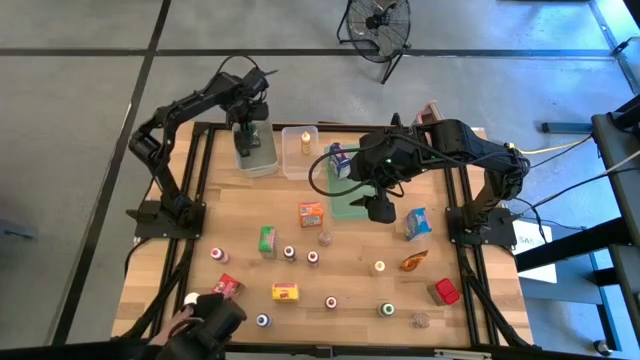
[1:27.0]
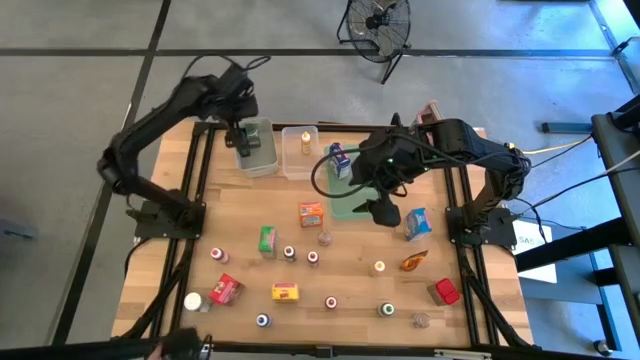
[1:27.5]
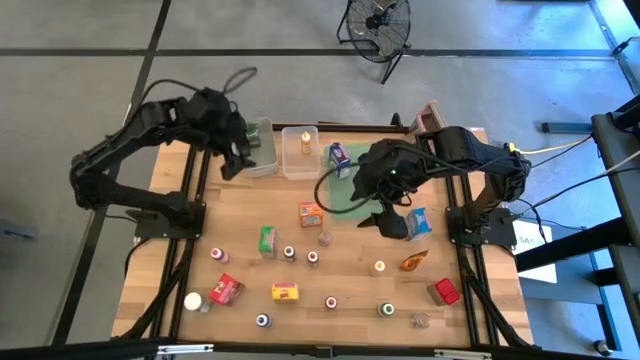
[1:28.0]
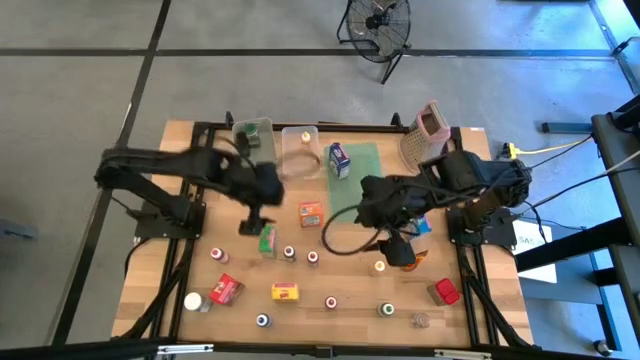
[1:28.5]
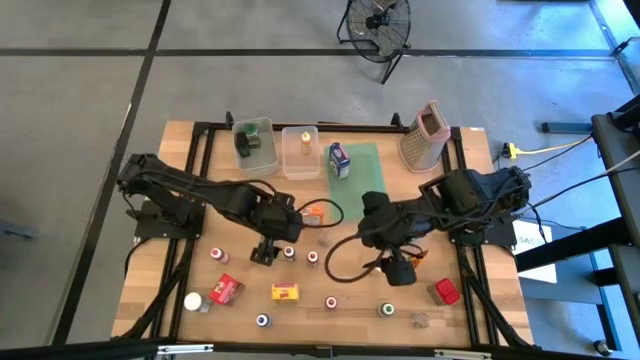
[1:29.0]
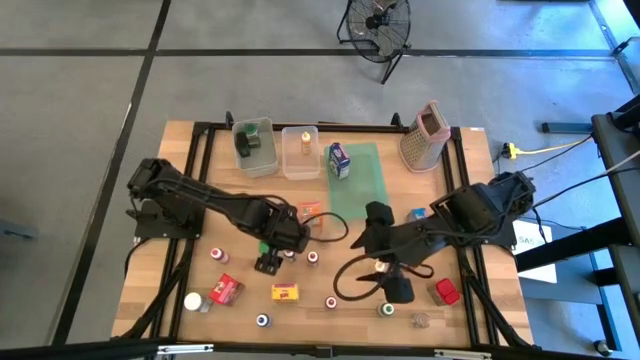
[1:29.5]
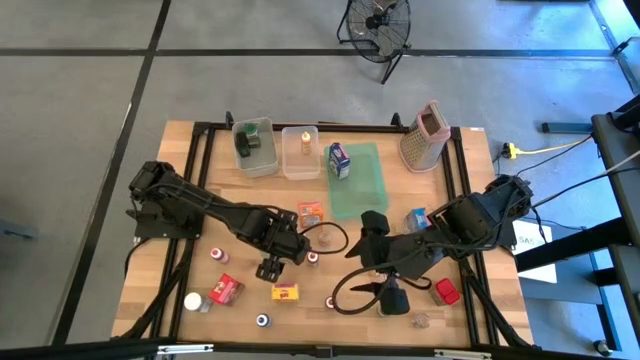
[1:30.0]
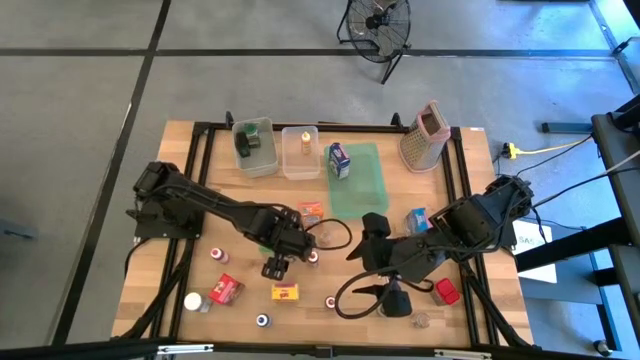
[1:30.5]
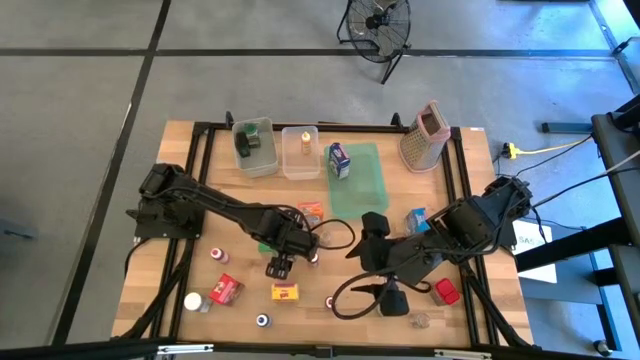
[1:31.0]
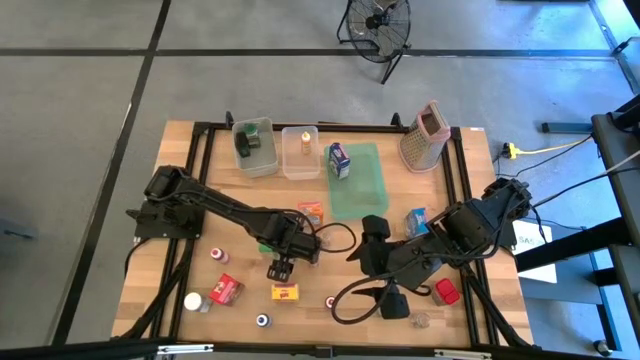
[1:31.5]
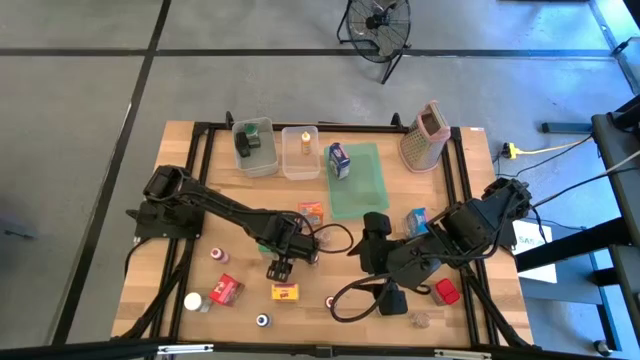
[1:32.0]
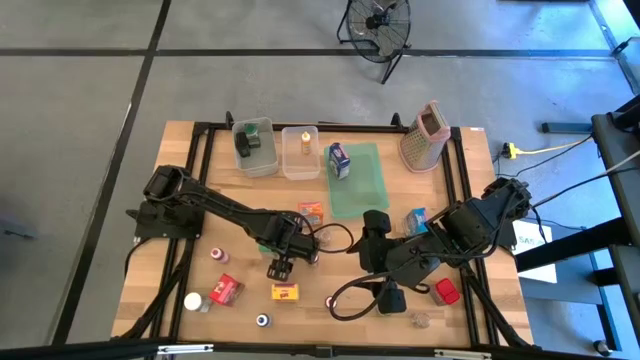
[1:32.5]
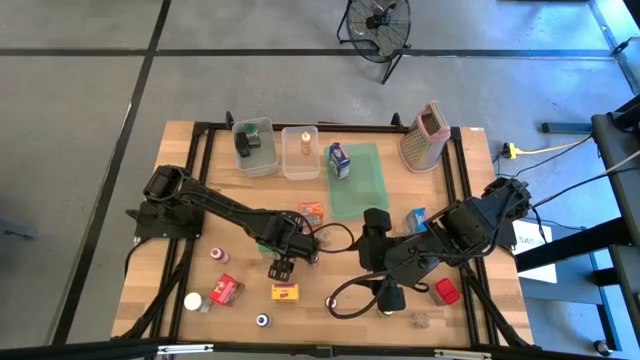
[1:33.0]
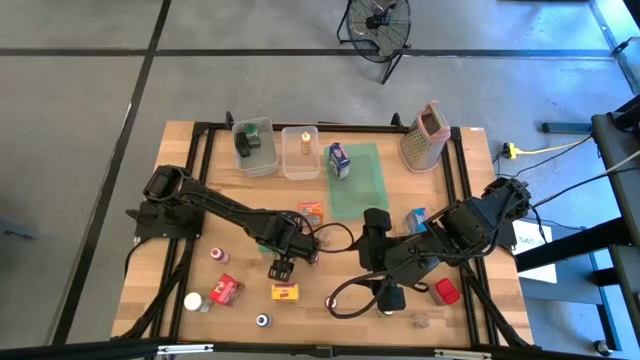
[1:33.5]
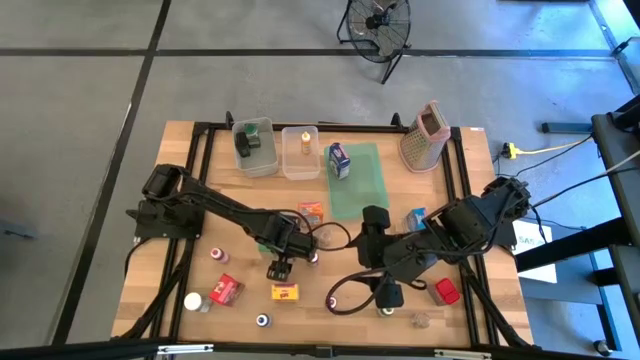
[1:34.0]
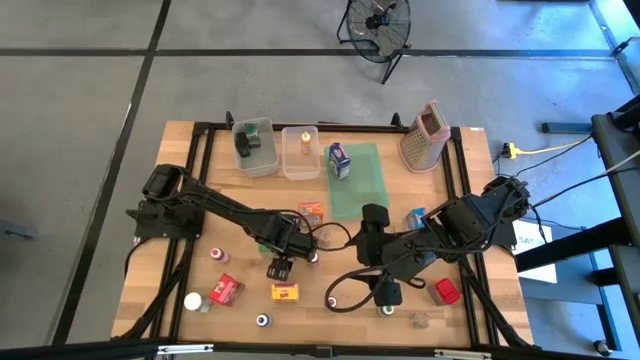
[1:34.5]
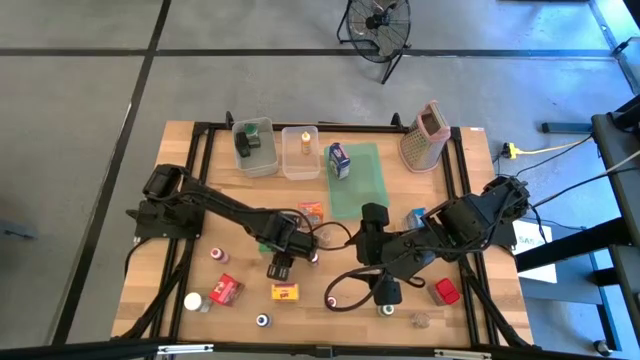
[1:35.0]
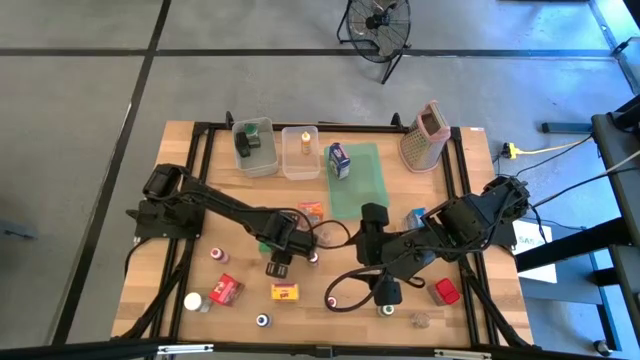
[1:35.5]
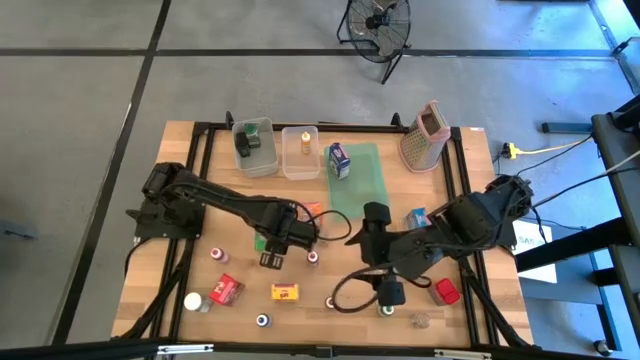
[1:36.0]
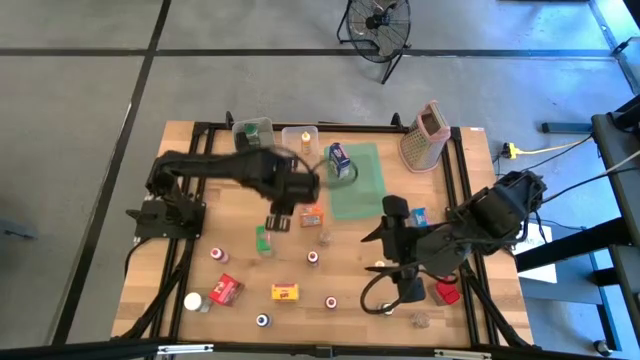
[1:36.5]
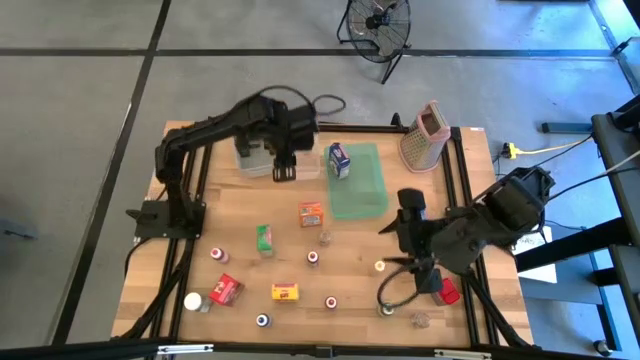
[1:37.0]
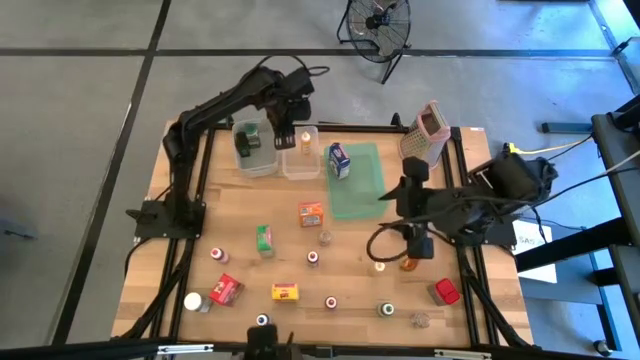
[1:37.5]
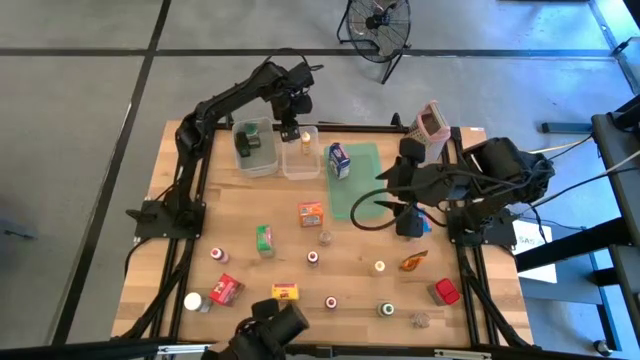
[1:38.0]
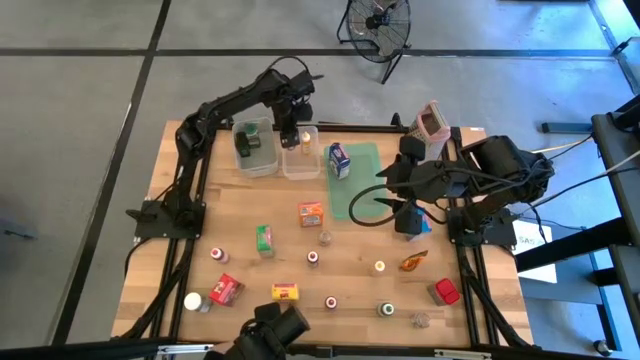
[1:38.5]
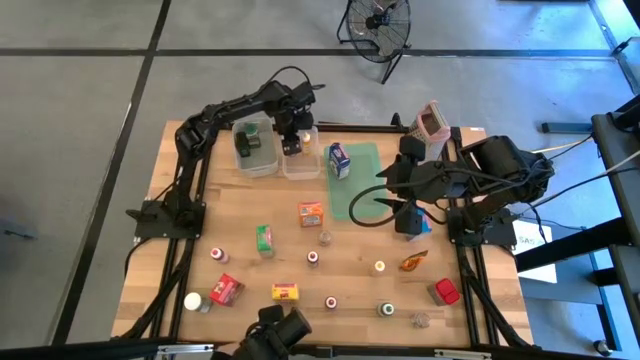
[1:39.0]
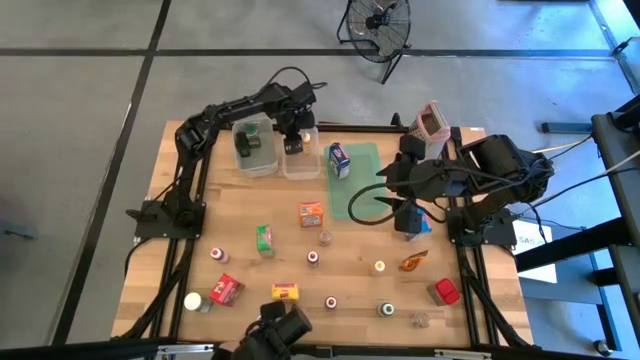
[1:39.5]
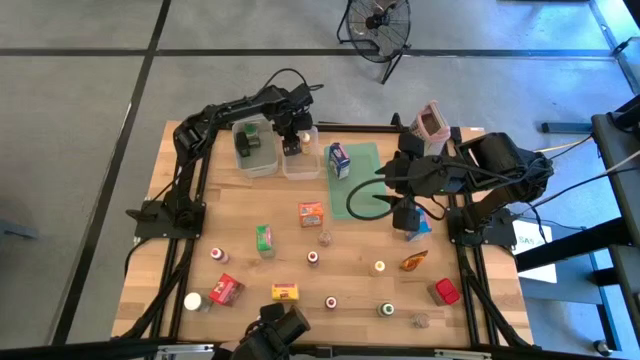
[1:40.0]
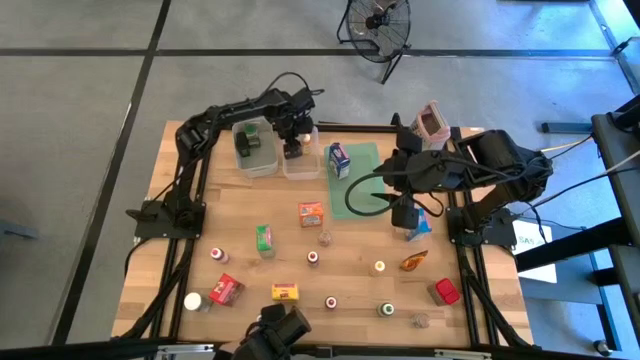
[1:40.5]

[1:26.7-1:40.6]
Task: Pick & Place Kitchen Items
Put the violet food coloring bottle into the transparent bin

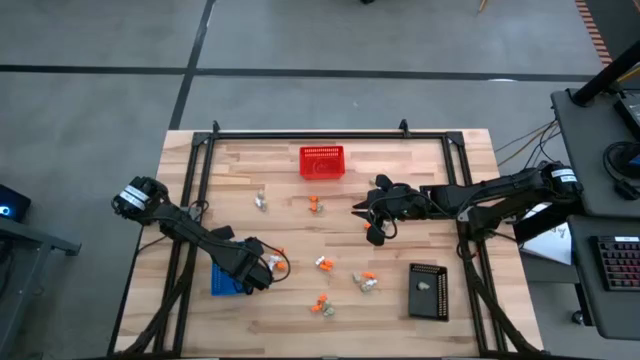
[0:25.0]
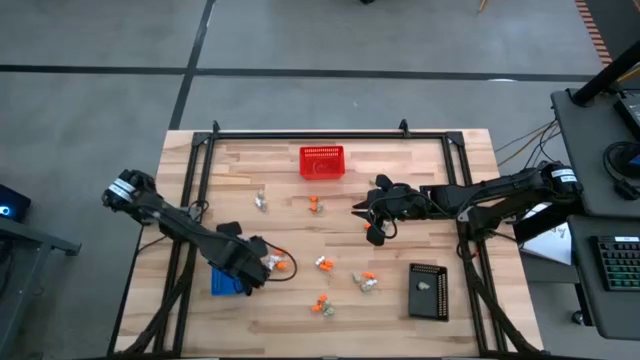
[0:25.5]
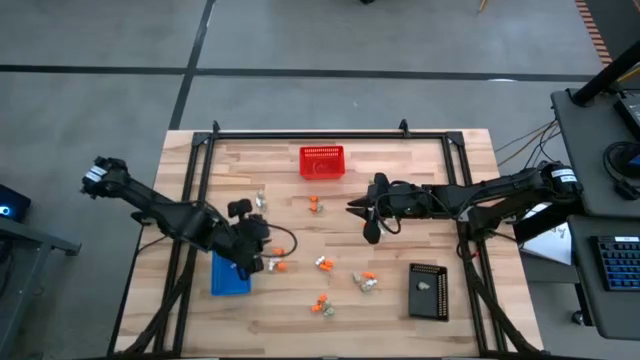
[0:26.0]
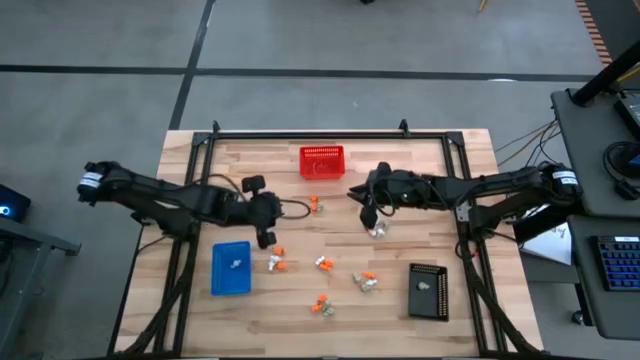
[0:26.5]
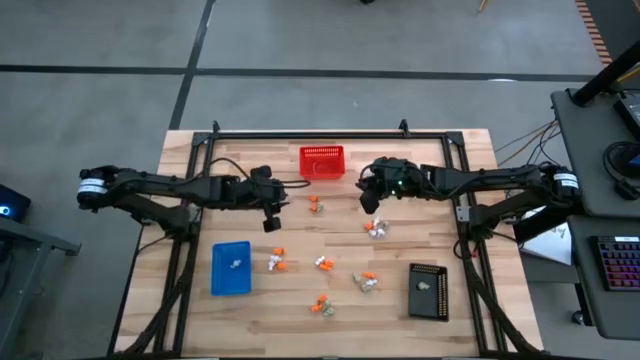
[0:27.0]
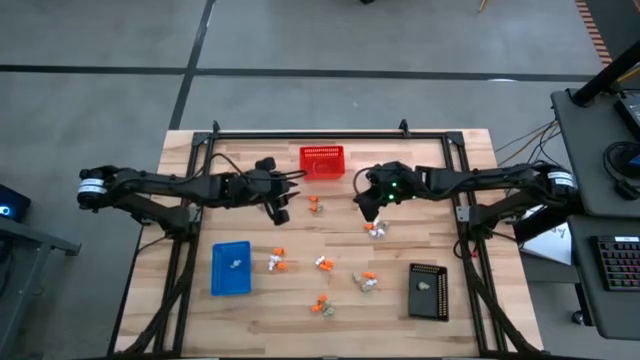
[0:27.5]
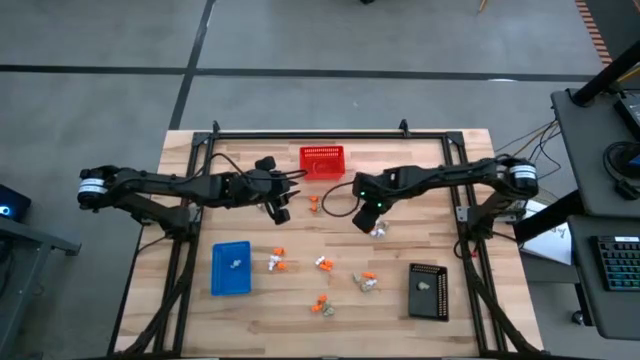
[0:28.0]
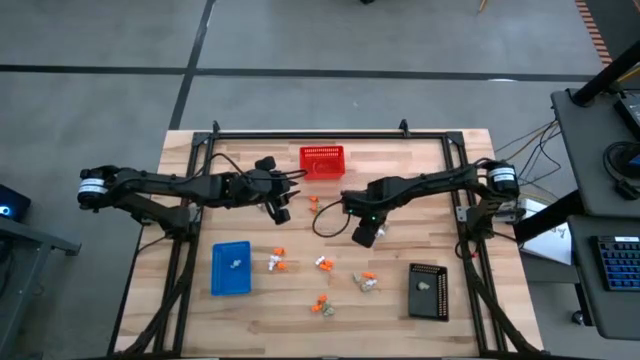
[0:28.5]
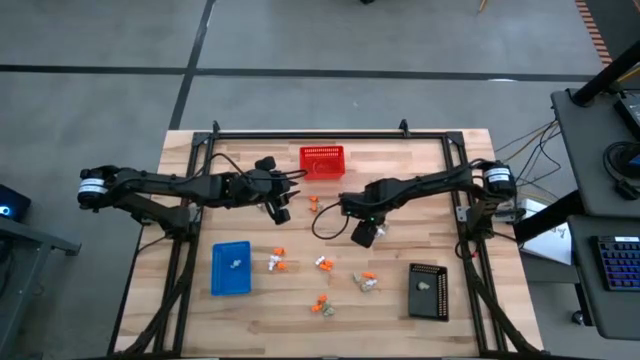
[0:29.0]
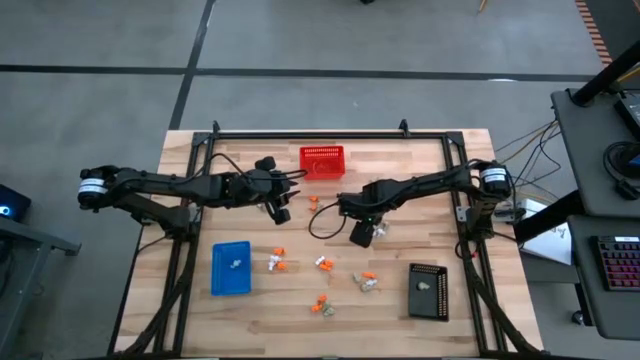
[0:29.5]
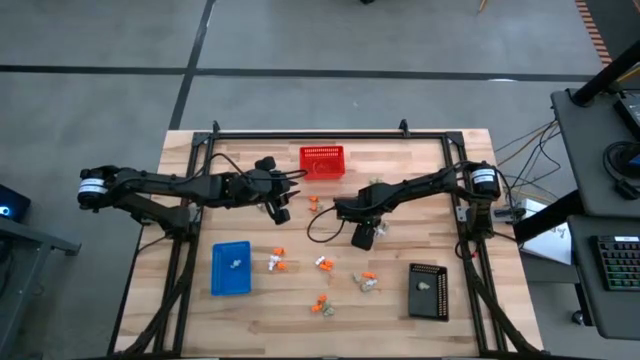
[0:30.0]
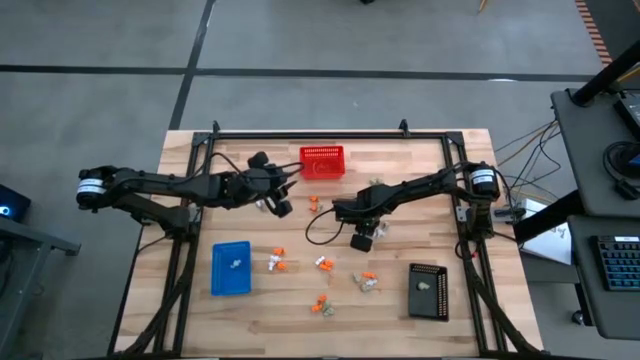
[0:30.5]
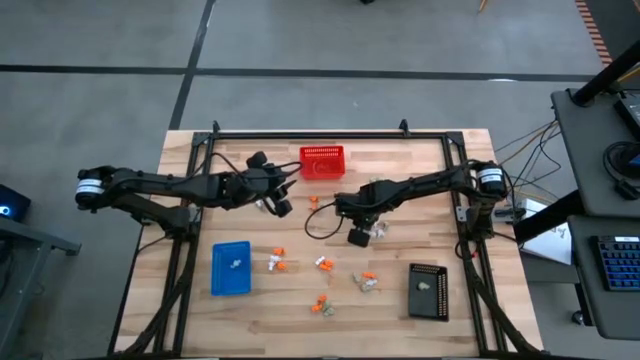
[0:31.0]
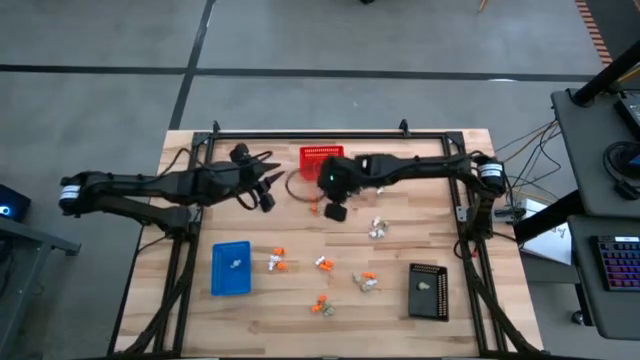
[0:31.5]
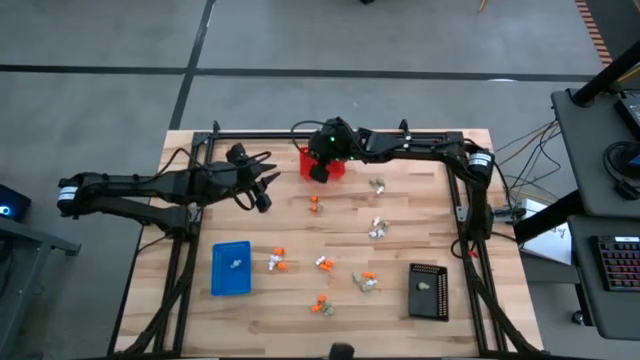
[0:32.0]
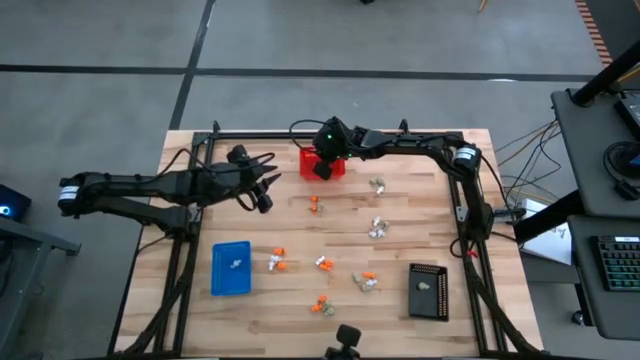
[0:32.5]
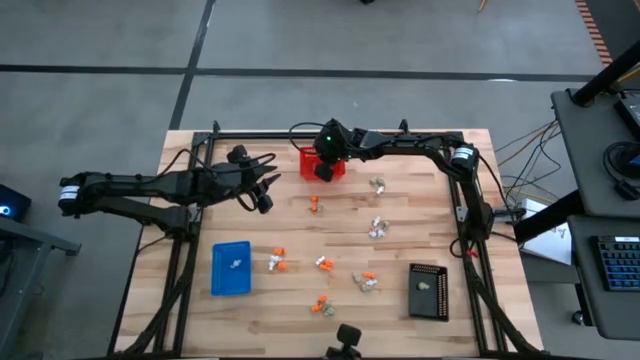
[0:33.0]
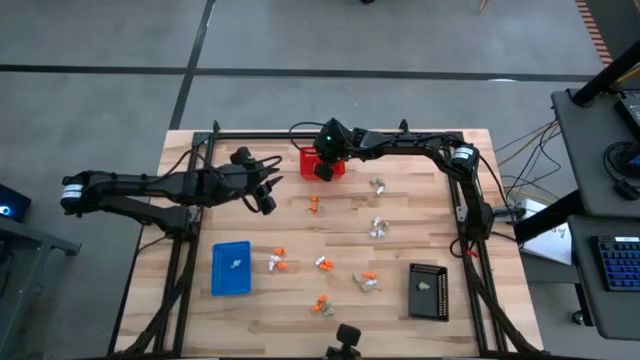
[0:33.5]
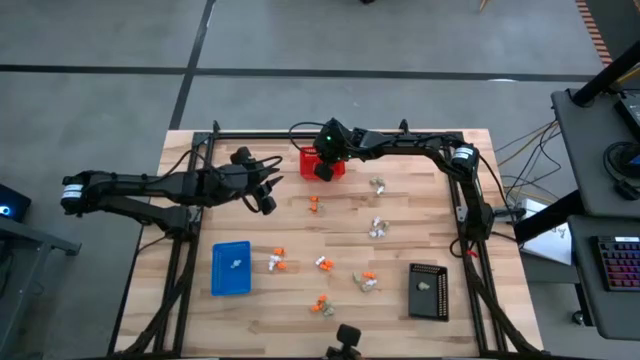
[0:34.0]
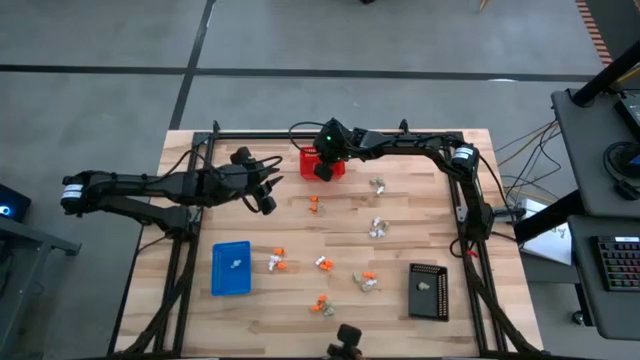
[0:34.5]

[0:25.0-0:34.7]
Task: Sort Halloween decoration
Put the orange skeleton toy into the red bin
